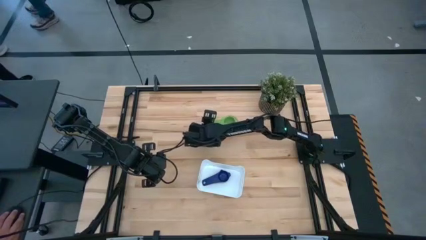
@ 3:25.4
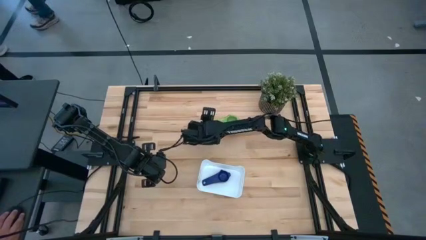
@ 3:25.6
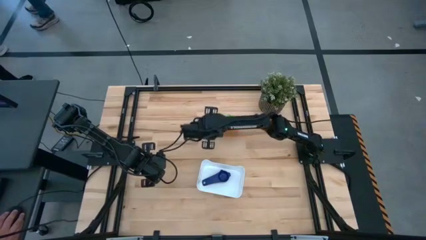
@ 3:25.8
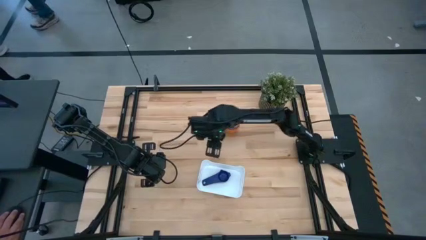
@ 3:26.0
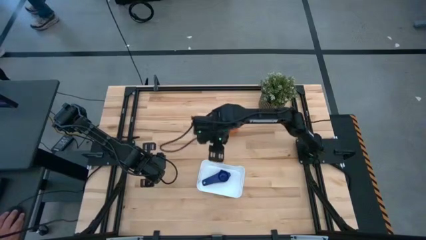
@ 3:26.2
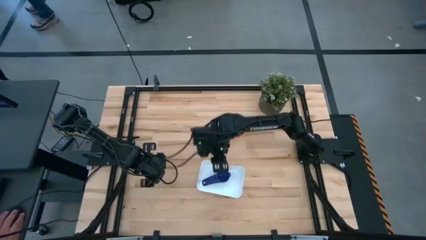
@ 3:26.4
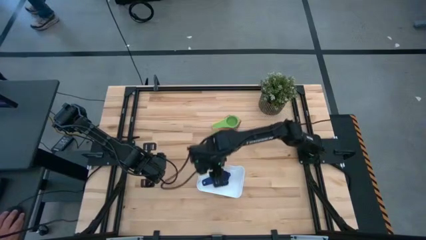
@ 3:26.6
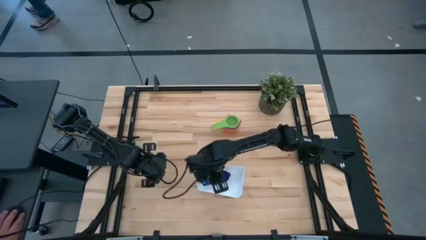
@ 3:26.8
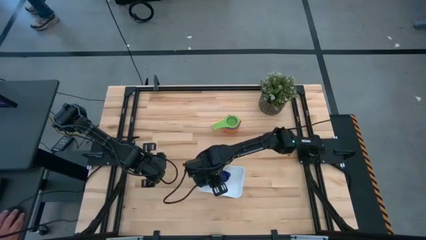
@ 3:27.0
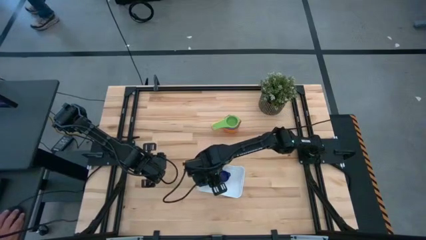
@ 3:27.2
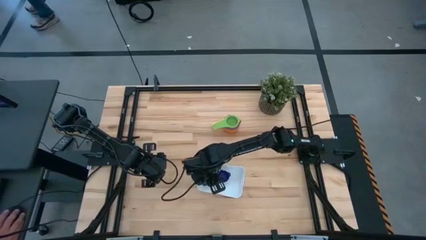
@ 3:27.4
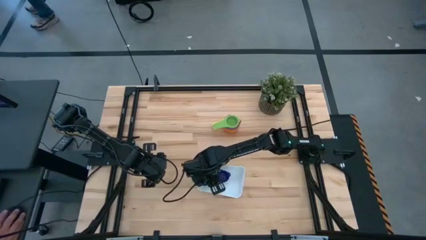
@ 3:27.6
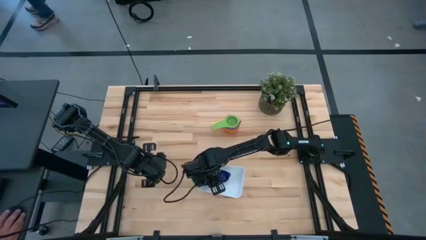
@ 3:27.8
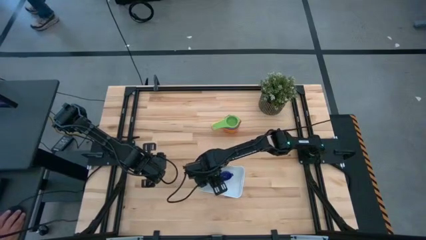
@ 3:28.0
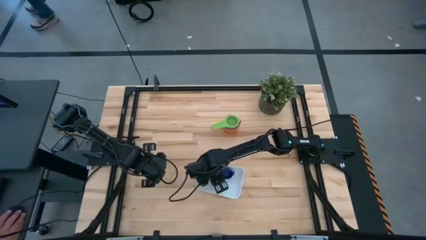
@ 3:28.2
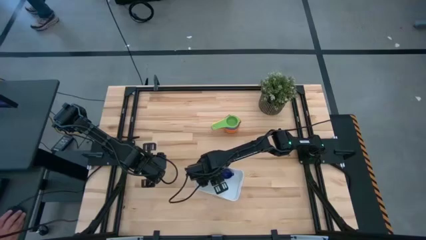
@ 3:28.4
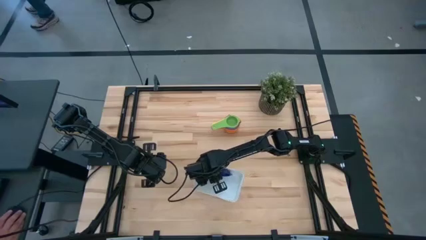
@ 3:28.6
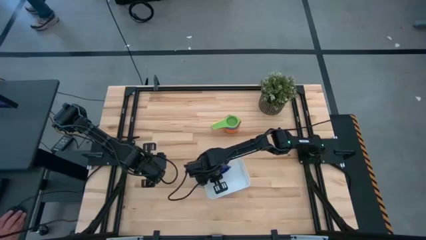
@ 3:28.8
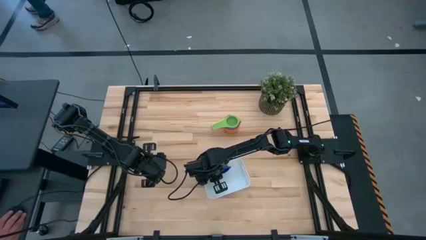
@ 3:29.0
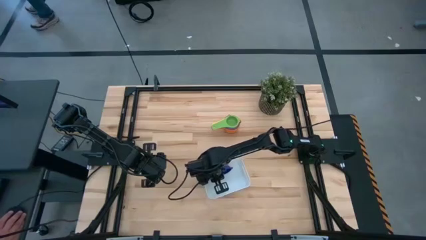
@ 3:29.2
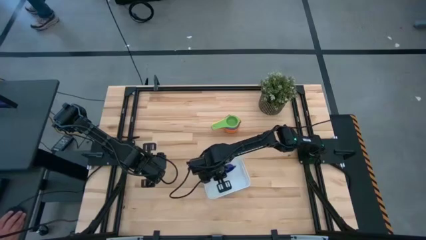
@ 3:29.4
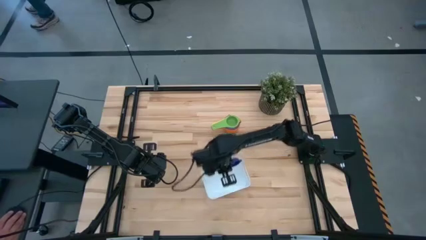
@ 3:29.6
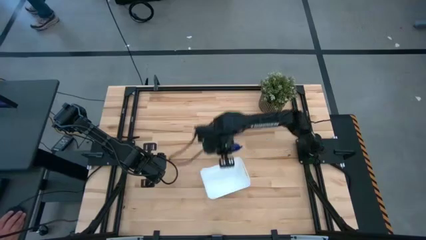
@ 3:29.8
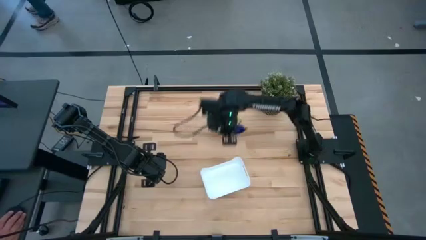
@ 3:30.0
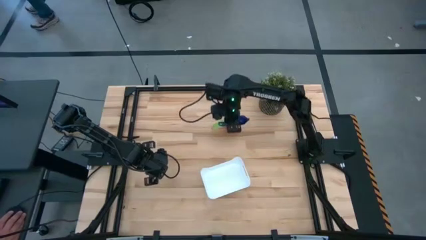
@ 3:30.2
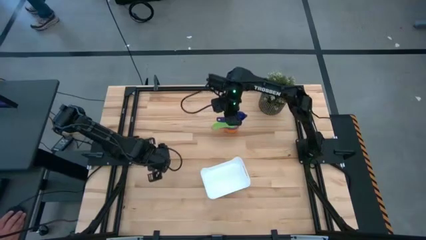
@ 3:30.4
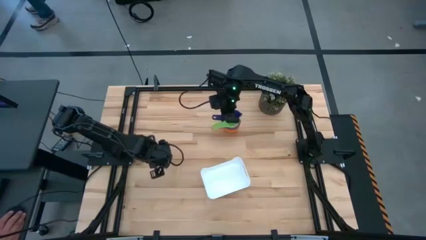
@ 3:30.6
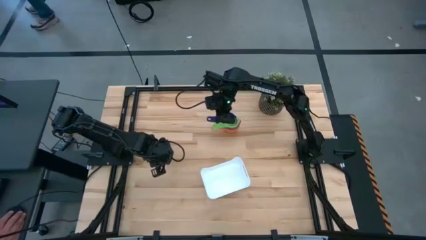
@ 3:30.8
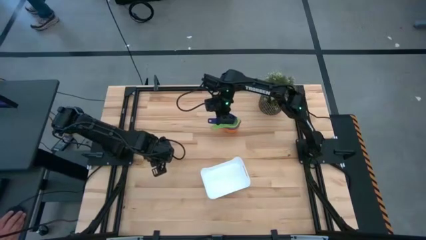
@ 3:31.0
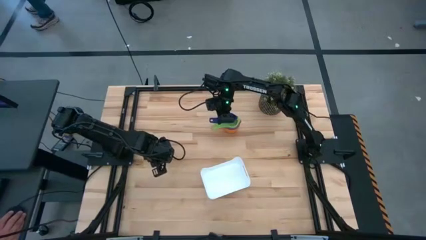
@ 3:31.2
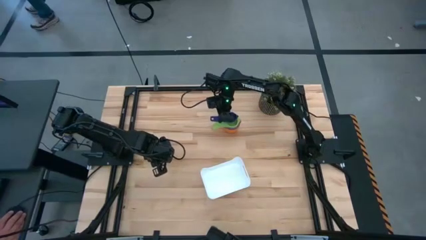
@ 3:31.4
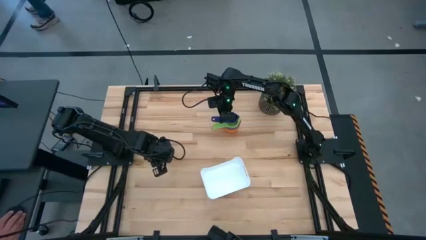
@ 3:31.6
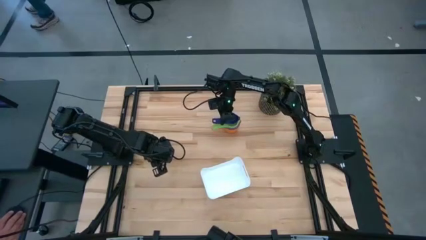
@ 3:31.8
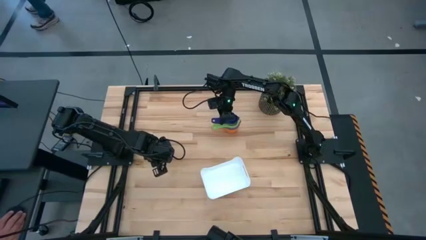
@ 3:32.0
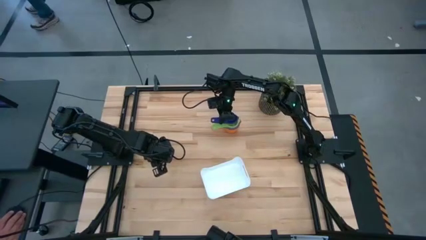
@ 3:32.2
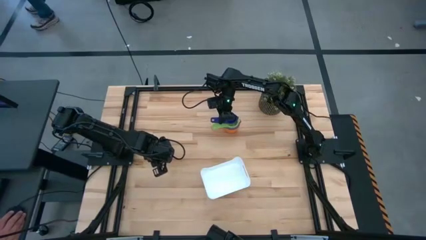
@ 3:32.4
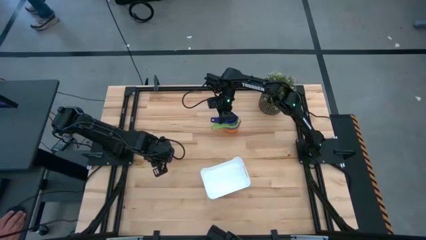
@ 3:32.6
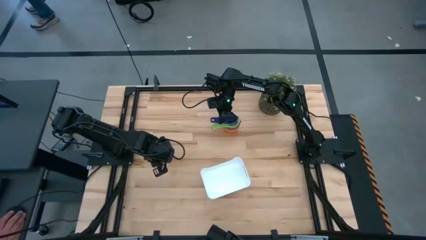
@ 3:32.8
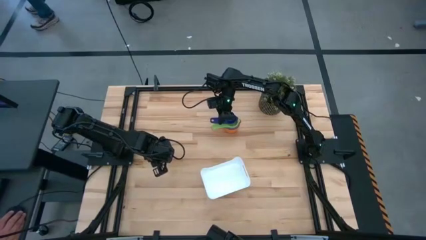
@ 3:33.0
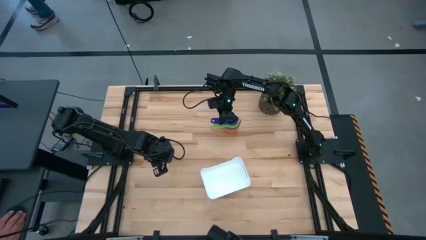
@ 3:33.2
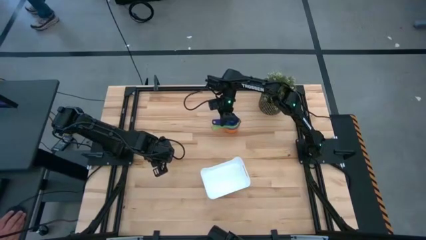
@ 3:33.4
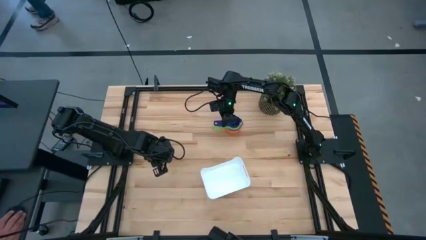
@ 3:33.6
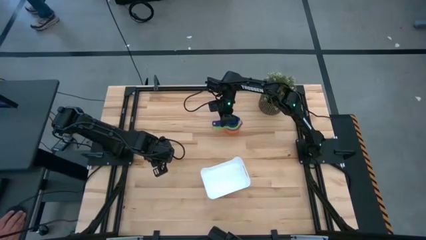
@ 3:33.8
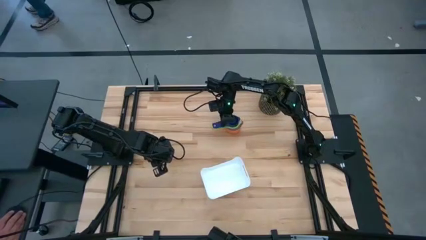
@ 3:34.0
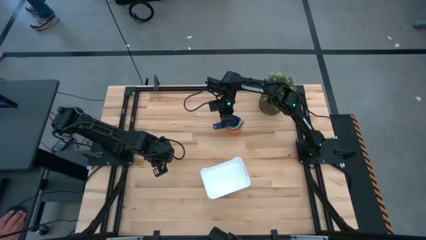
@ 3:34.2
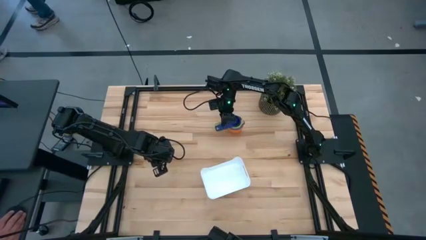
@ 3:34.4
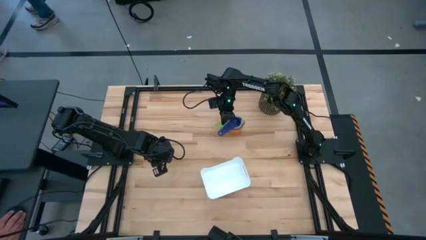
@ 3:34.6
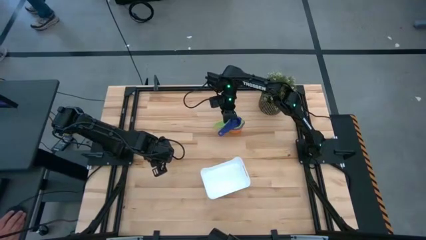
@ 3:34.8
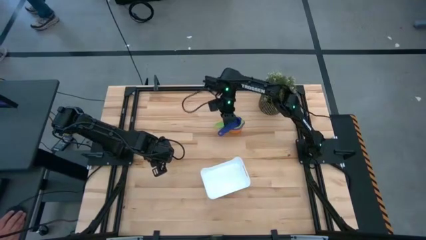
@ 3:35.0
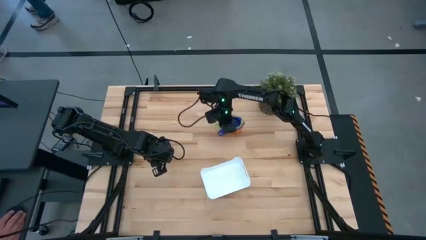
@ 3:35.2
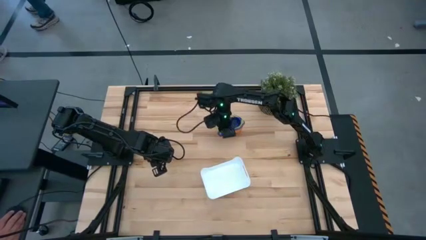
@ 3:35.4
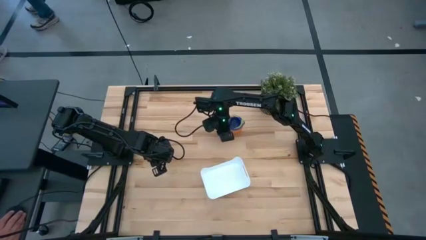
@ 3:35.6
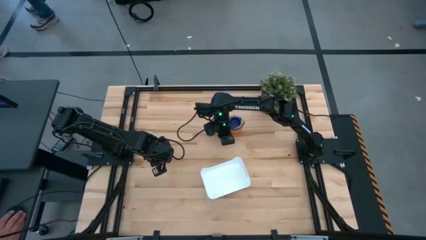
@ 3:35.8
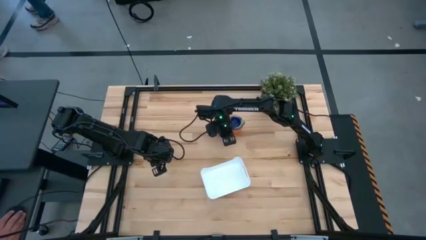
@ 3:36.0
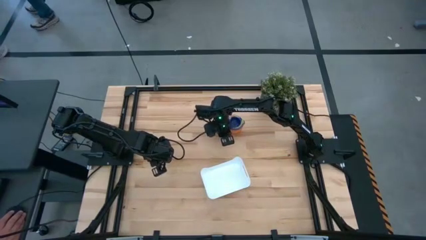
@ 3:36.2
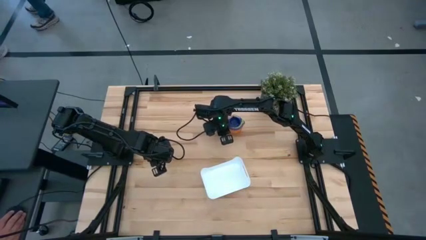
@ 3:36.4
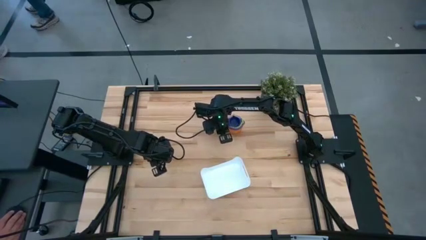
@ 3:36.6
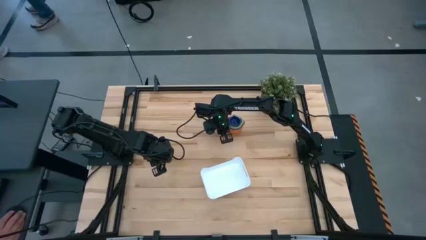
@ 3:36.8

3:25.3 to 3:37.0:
Task: Nest measuring cups in basket
Stack the violet measuring cup into the green measuring cup

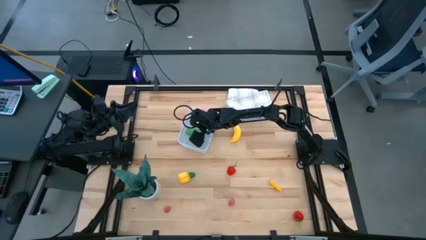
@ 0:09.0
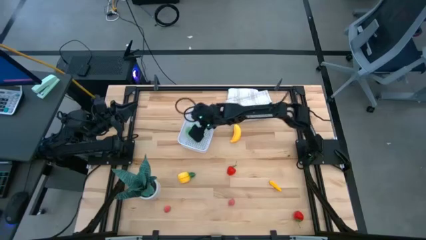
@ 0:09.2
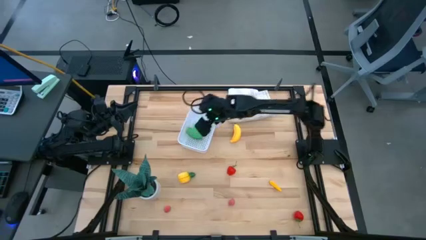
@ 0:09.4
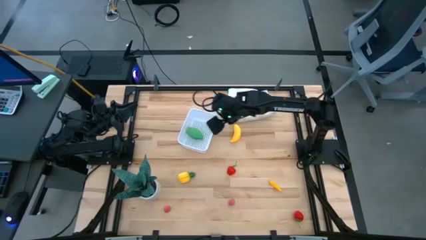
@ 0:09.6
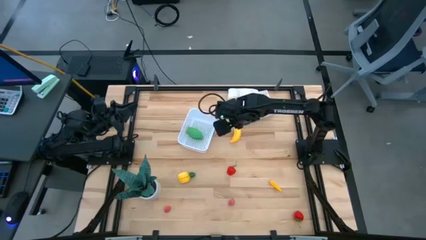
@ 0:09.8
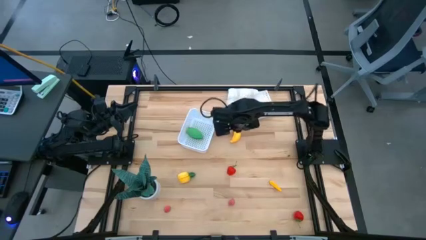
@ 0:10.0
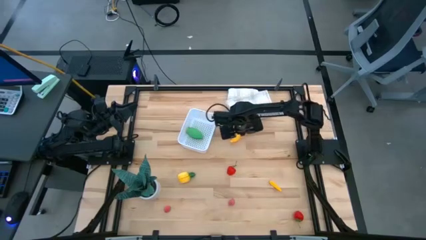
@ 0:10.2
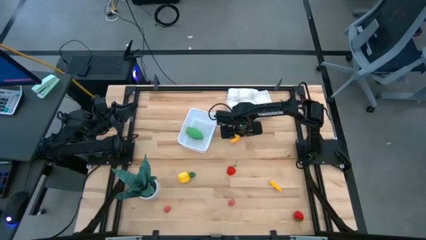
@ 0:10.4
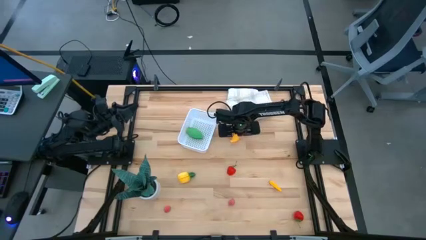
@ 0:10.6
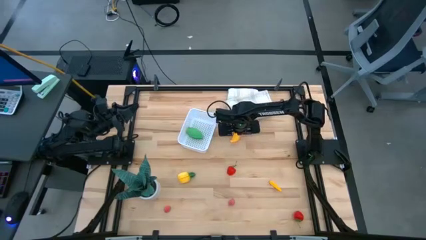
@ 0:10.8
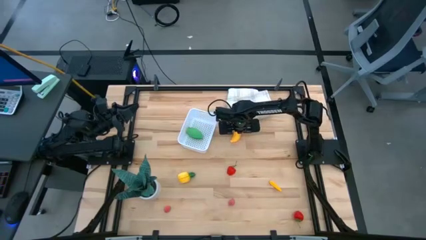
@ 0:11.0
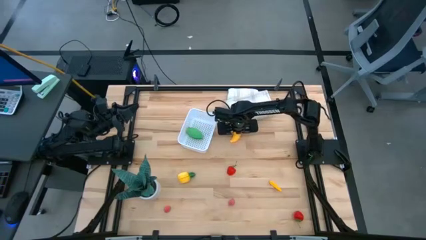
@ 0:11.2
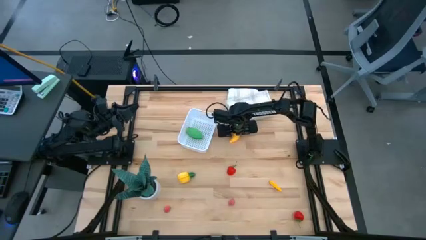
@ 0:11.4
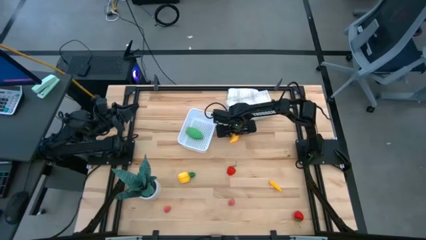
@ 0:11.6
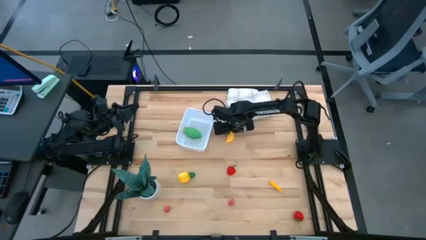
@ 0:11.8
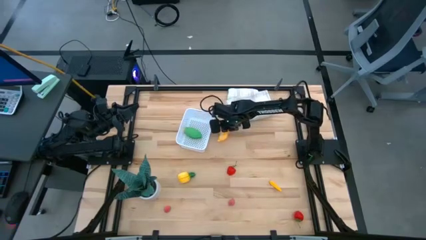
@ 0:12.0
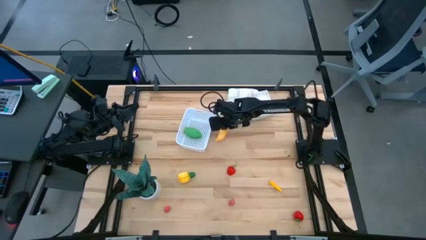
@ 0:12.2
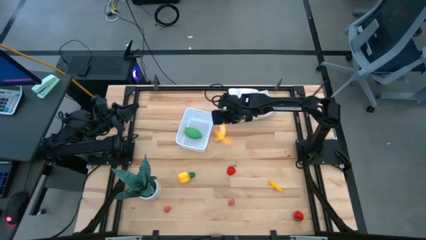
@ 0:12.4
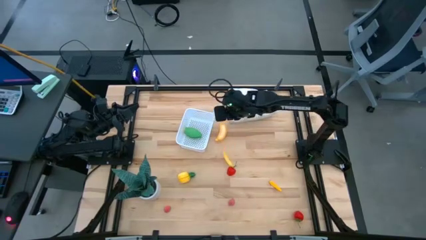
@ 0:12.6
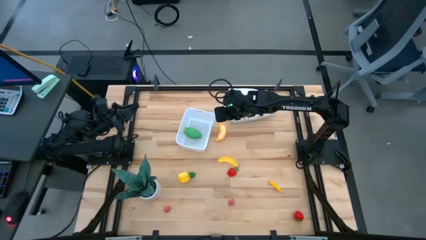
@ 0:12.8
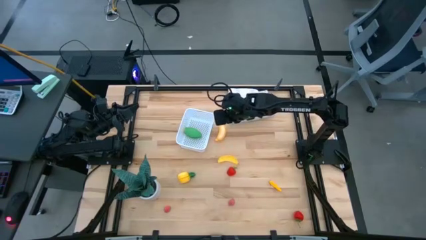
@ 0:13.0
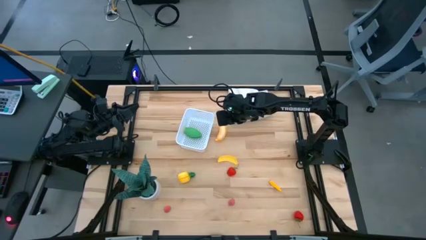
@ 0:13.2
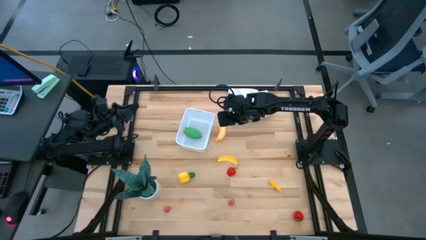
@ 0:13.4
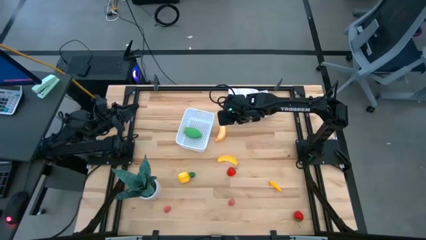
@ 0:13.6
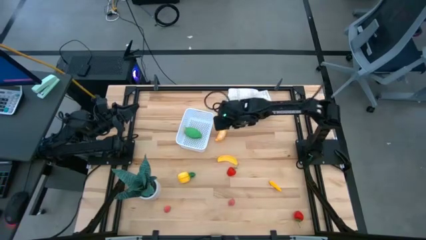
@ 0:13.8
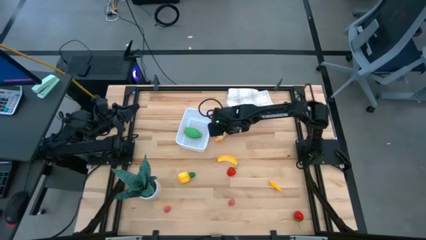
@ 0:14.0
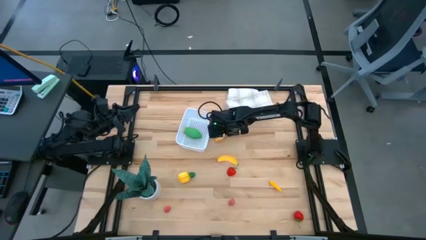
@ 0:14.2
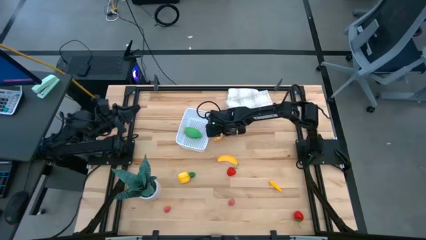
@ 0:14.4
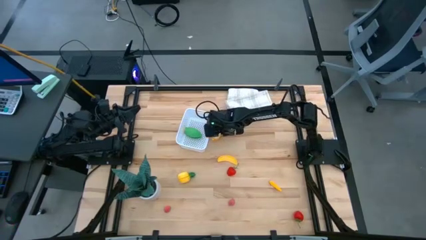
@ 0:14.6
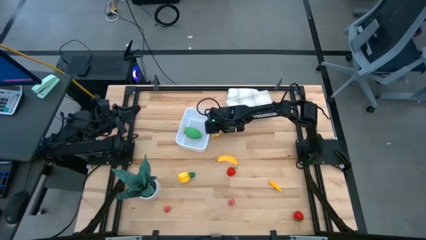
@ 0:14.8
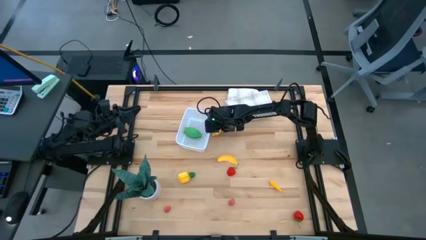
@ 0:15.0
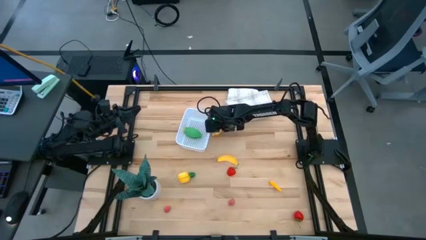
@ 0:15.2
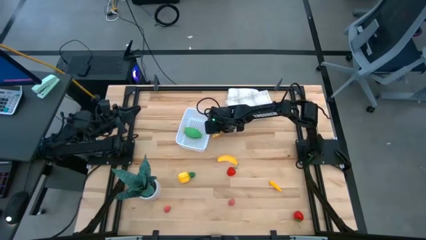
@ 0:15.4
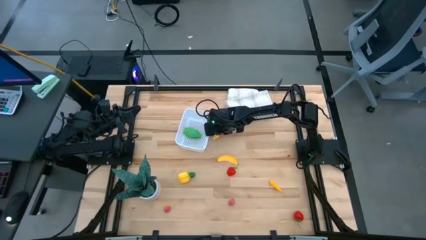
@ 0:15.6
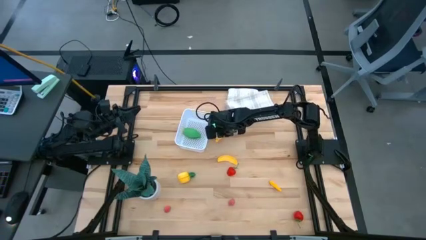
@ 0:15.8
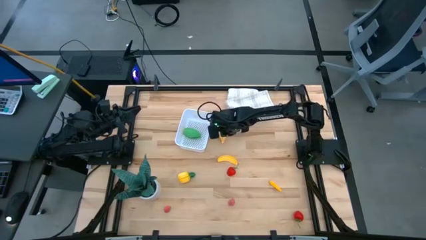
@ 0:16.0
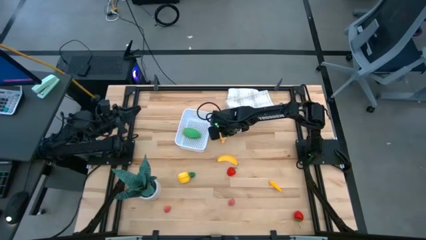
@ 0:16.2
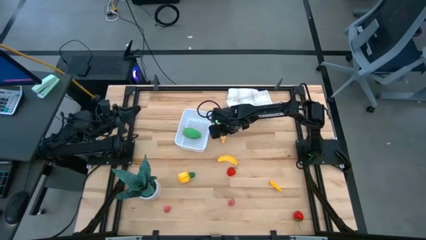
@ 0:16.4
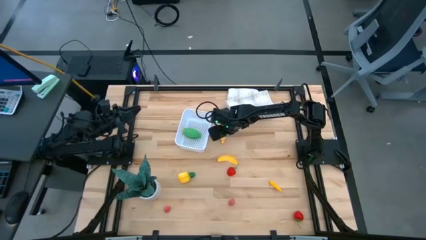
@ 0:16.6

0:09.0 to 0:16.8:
Task: Pick and placing Produce into tupperware
Put the banana into the white basket
